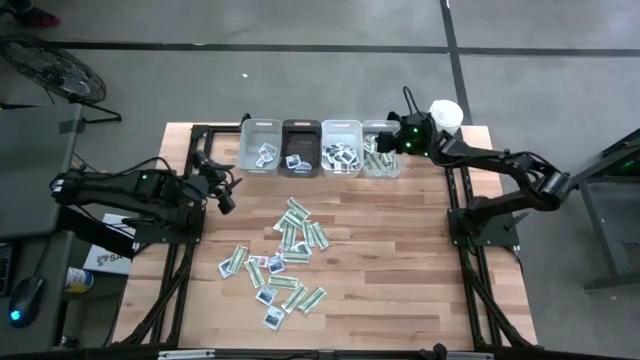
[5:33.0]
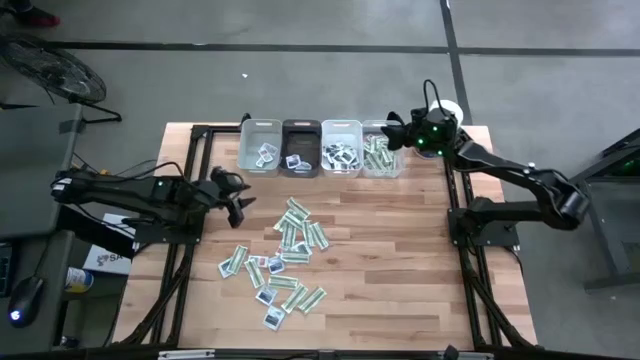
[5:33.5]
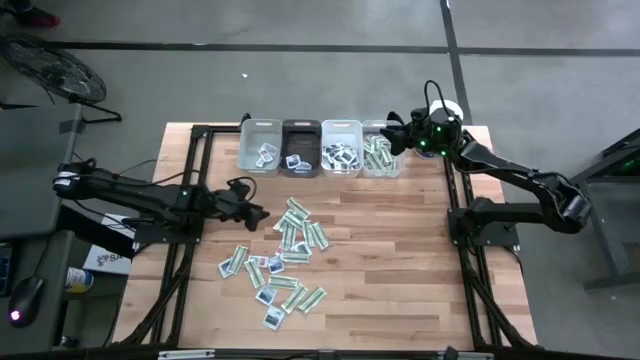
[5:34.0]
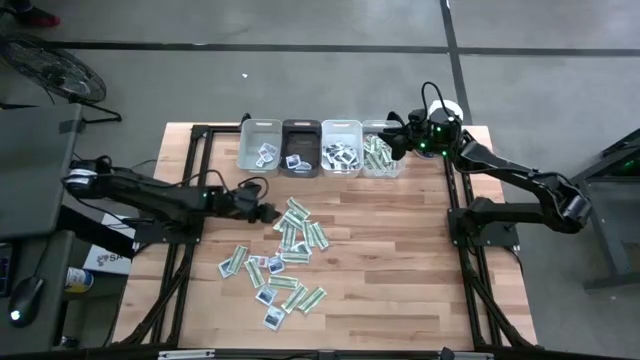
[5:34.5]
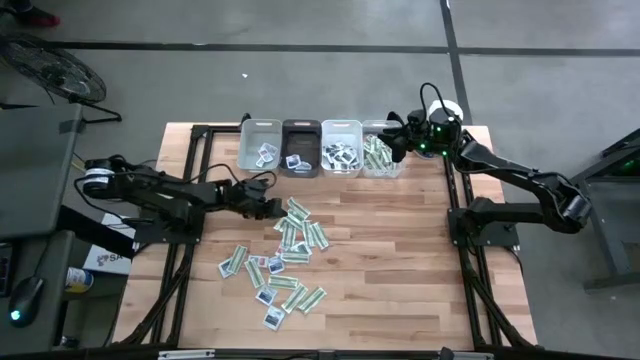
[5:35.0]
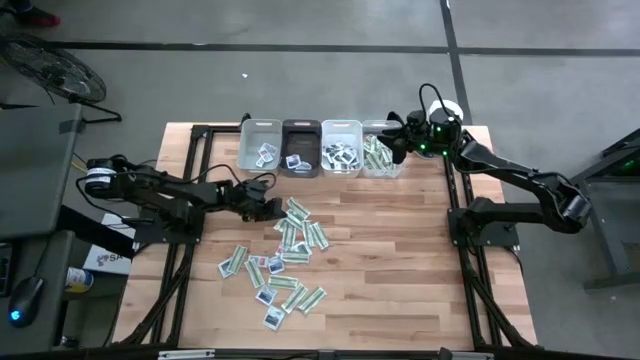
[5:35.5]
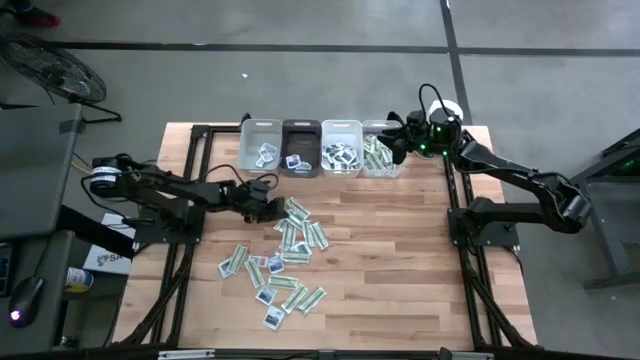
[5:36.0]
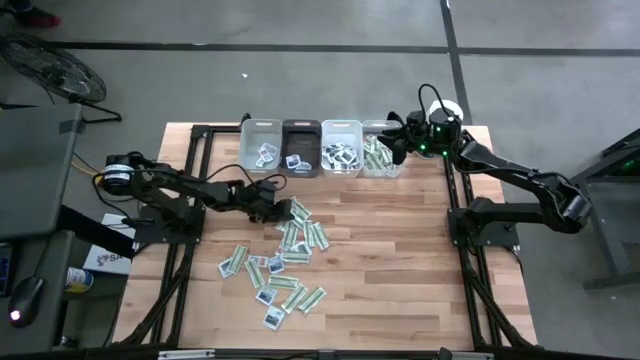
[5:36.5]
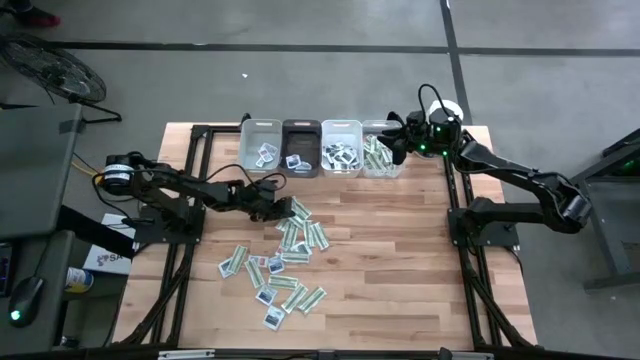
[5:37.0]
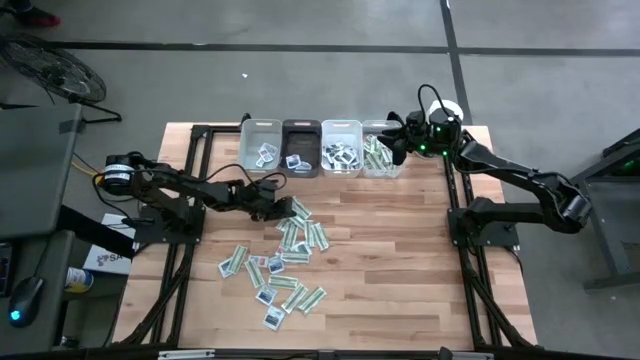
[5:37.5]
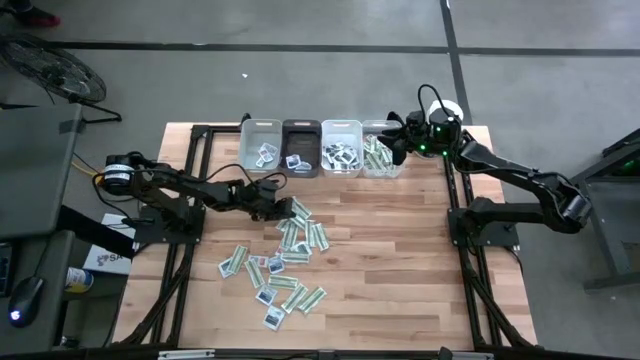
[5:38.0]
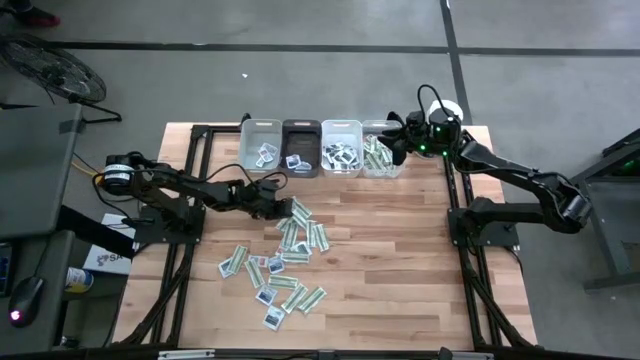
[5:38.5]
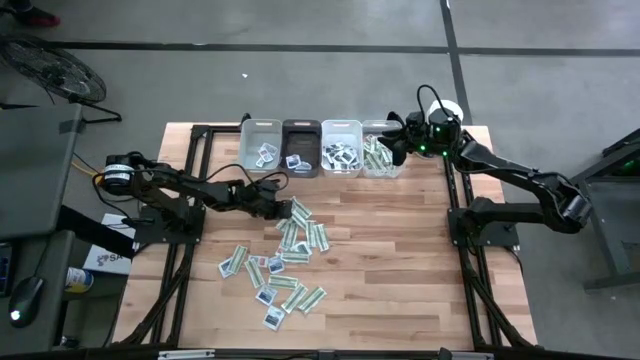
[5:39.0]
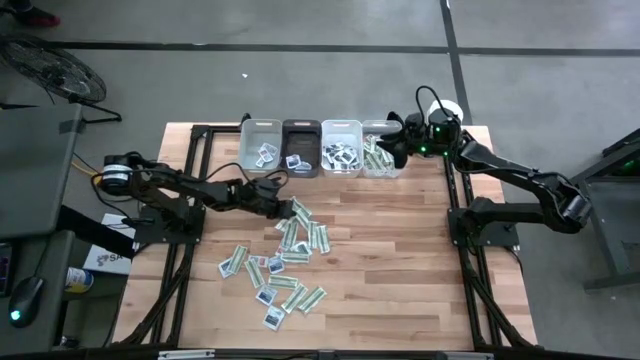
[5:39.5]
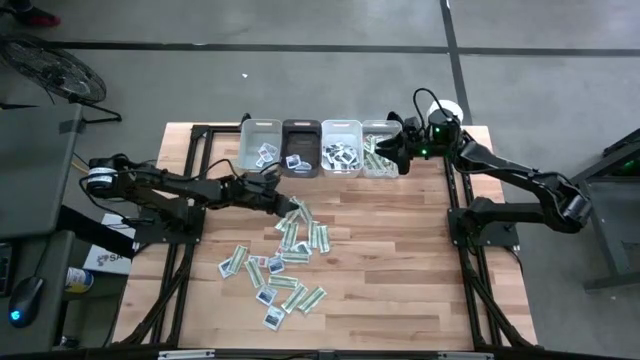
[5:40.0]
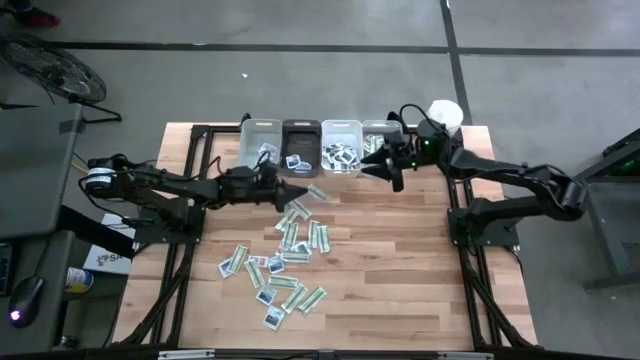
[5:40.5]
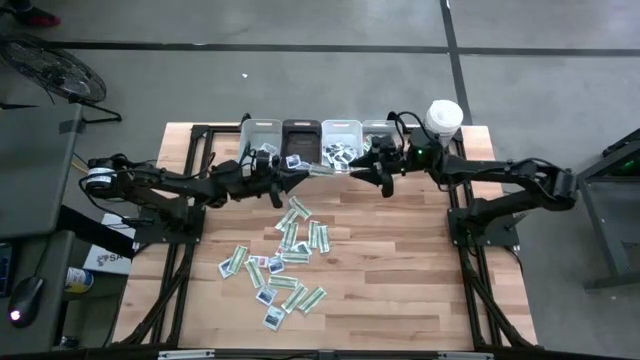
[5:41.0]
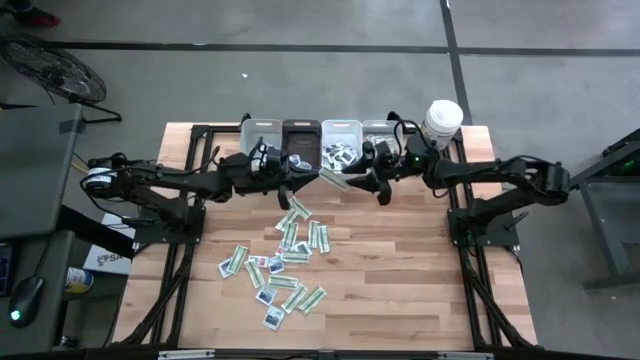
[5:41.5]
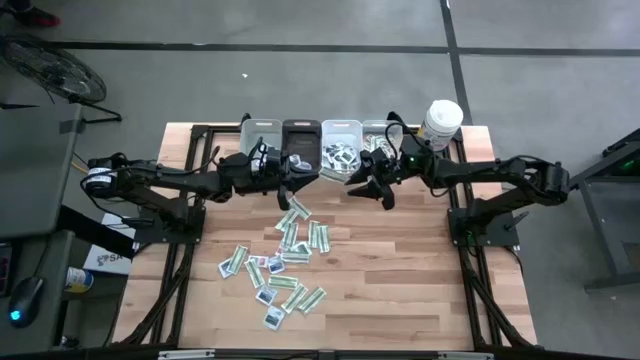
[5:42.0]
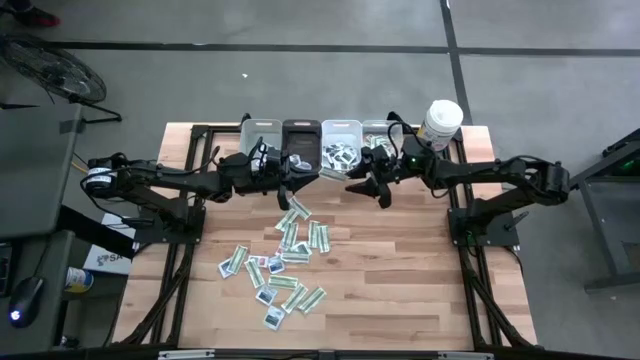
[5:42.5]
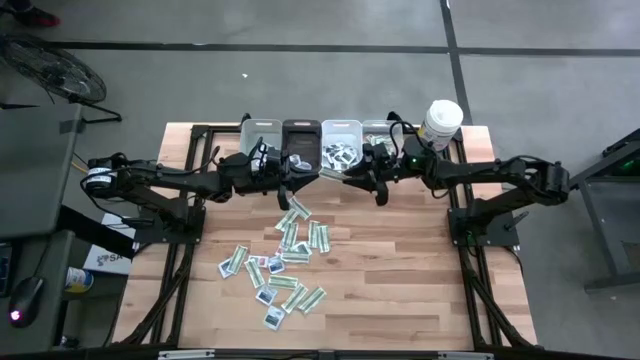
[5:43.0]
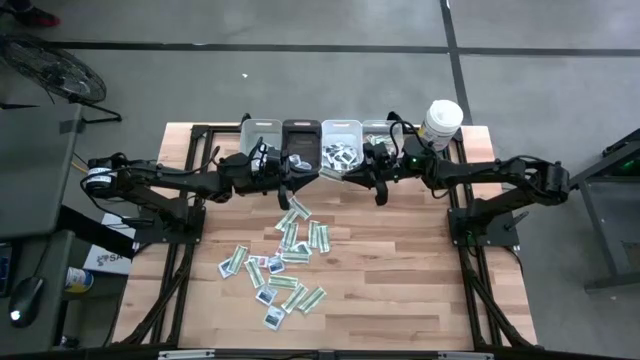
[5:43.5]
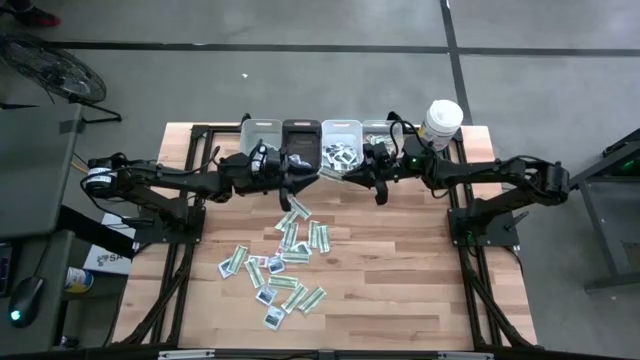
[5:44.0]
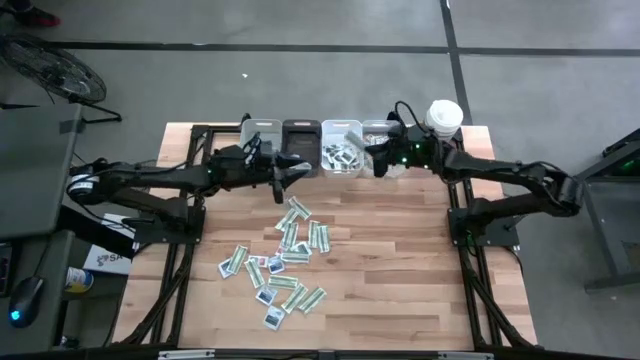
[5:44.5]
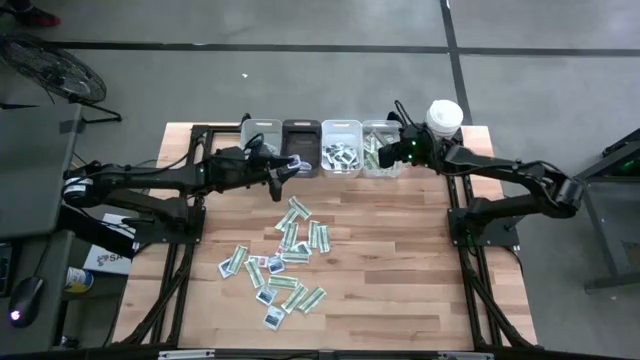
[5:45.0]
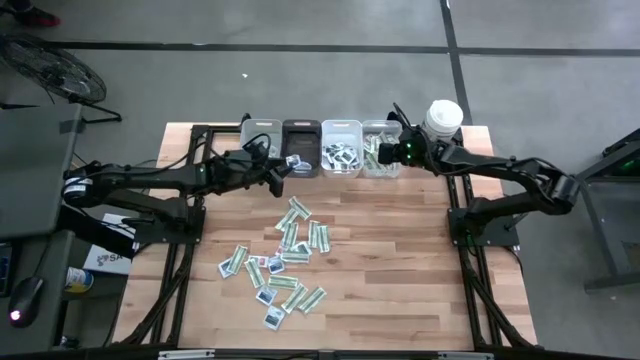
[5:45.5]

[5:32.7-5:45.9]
Task: Pick & Place First Aid Supplies
Put the green bandage into the transparent bin

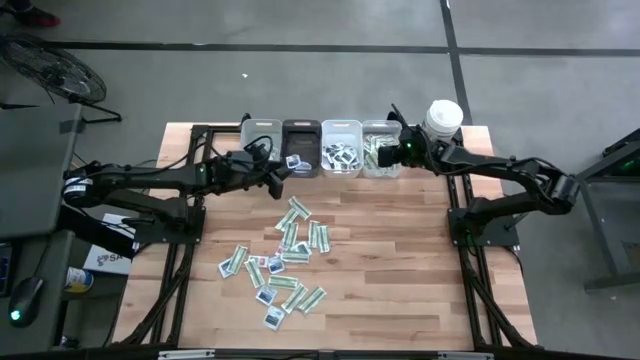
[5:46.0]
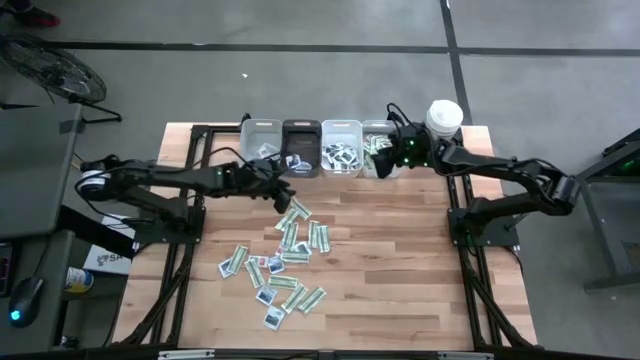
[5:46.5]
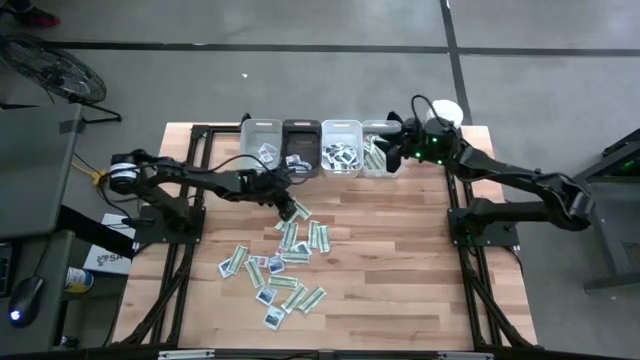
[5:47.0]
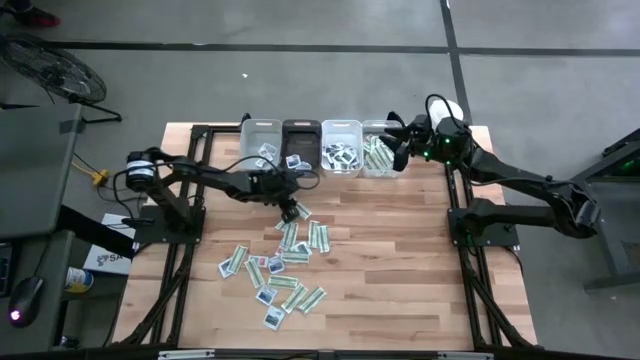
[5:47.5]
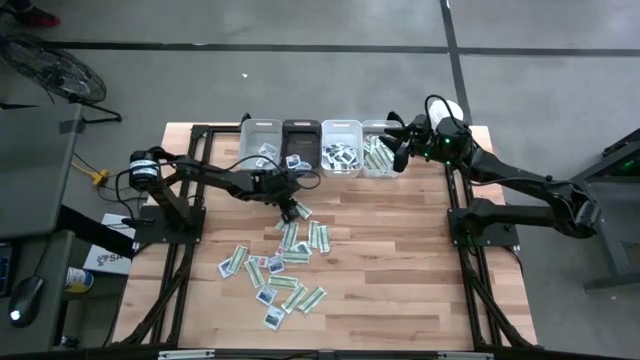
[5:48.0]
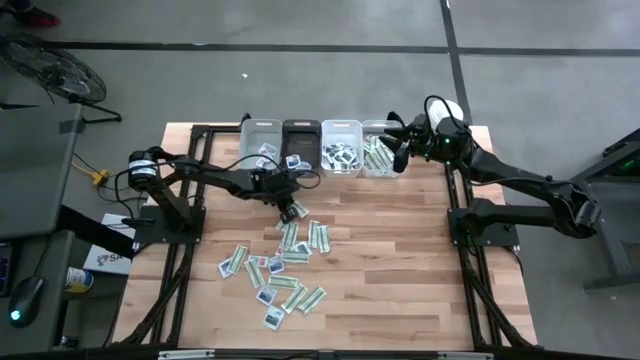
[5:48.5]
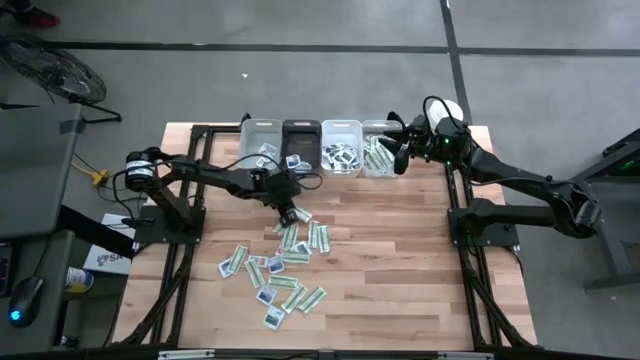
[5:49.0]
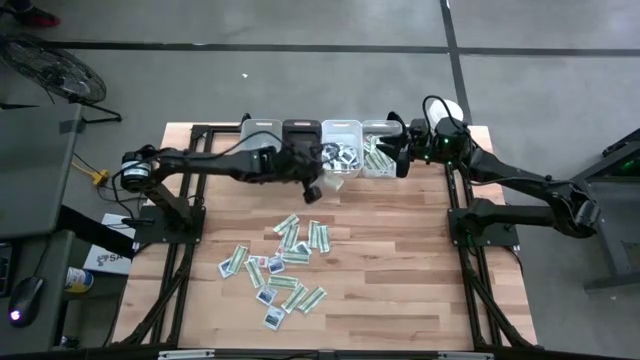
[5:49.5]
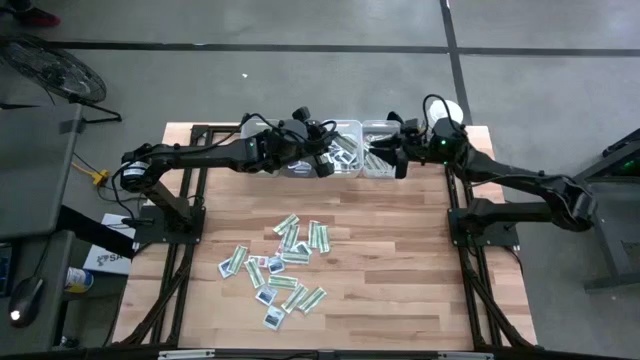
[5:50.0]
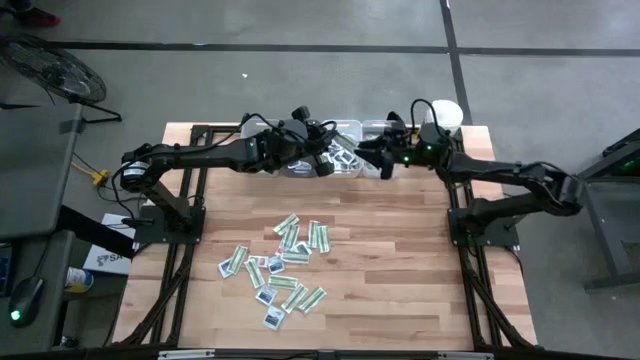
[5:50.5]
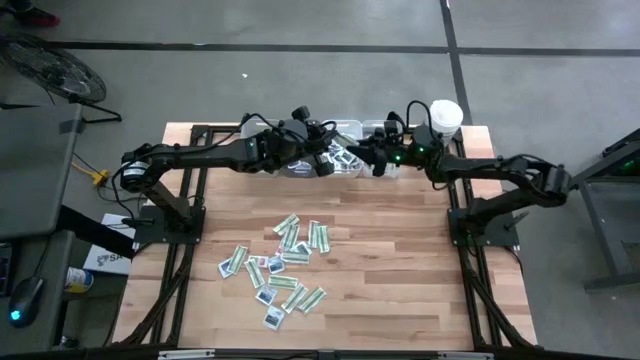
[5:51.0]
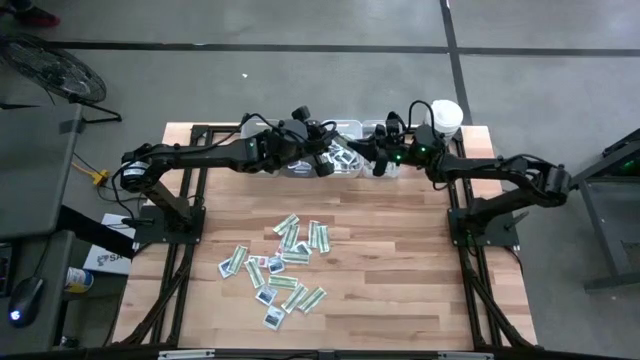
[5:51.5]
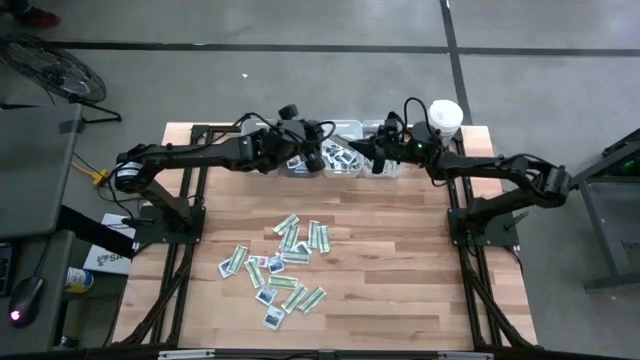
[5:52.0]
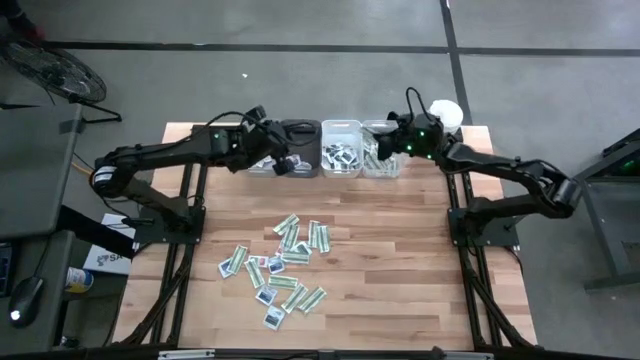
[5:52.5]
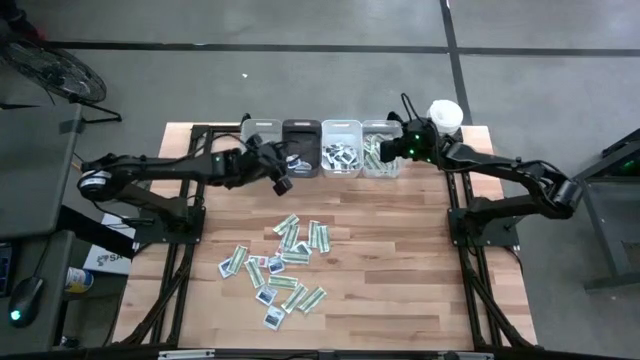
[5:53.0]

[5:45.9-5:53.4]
Put the green bandage into the transparent bin

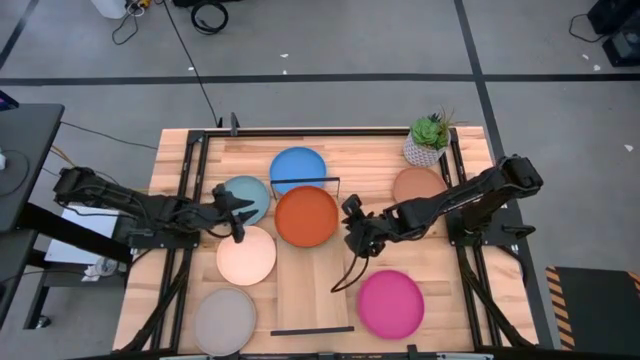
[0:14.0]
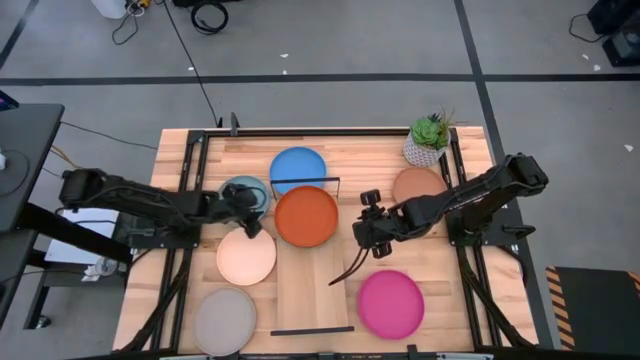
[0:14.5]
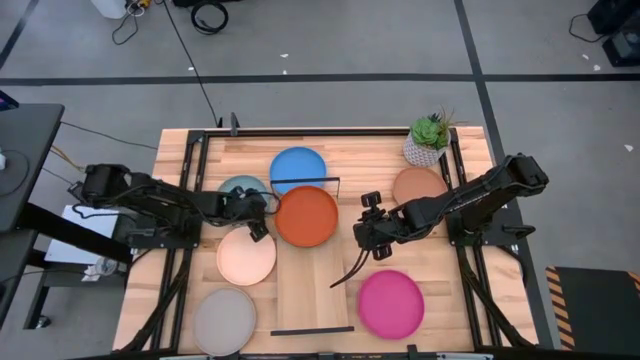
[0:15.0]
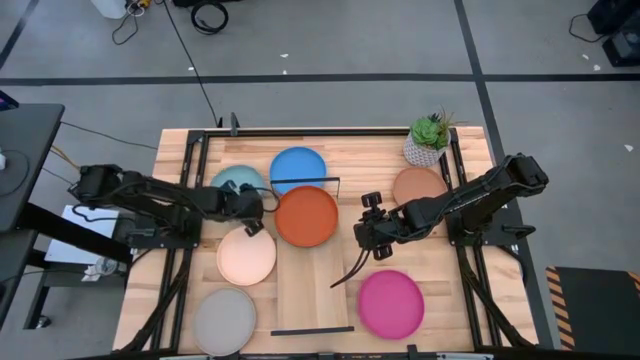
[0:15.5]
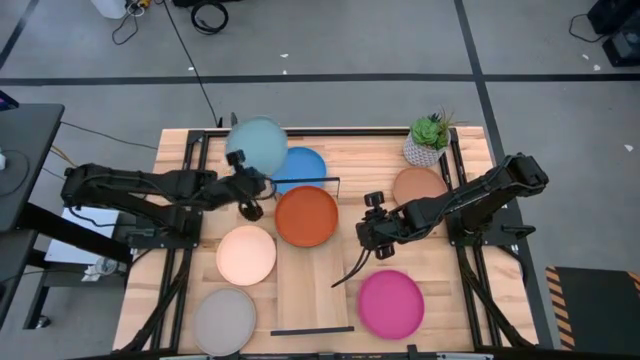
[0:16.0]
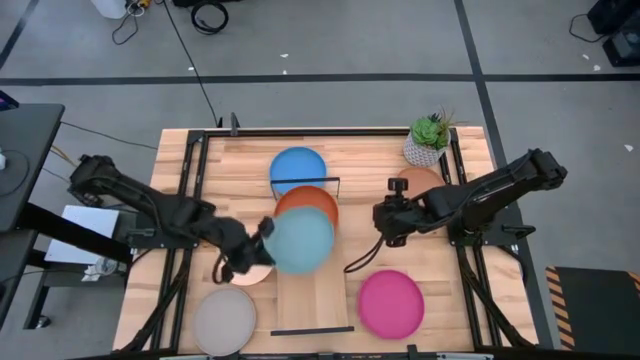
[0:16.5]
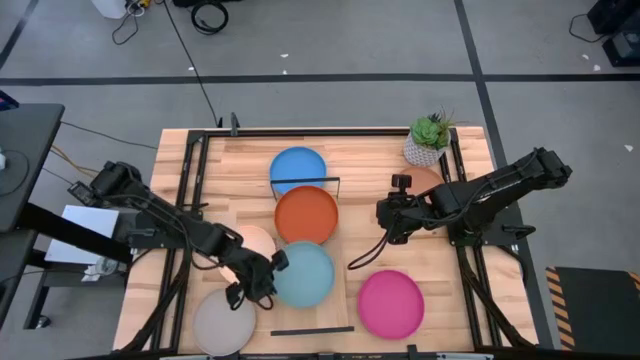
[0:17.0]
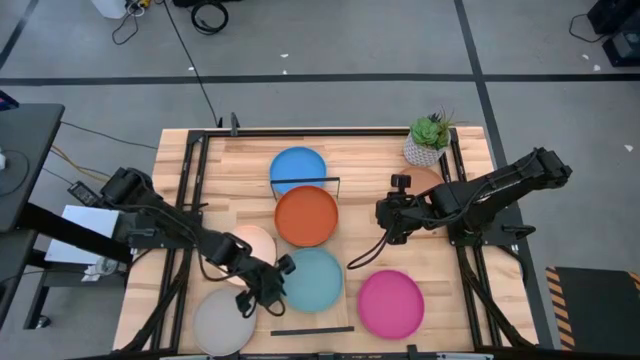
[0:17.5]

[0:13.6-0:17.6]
Task: Place and stack plates onto a shelf
Put the light blue plate on the shelf
